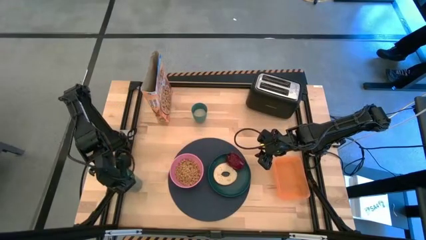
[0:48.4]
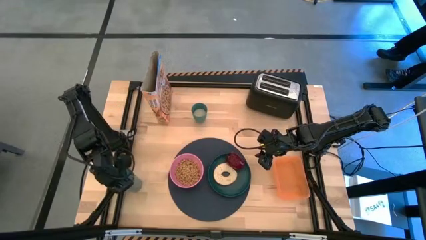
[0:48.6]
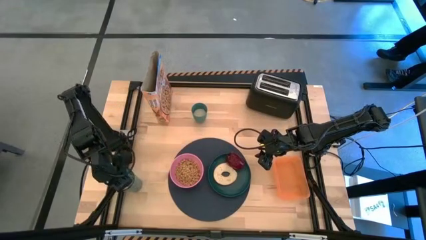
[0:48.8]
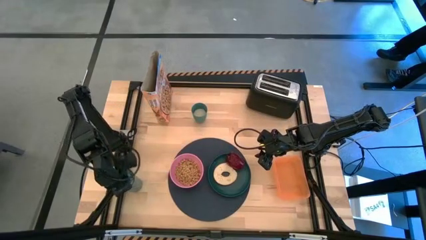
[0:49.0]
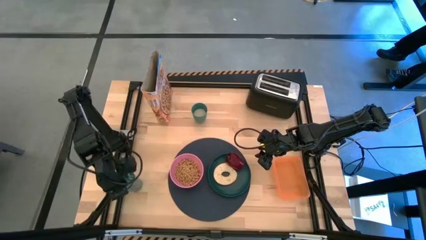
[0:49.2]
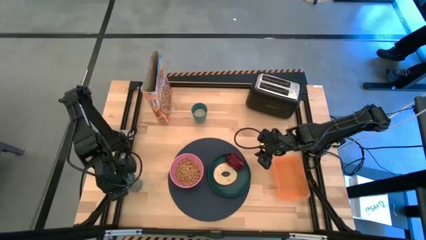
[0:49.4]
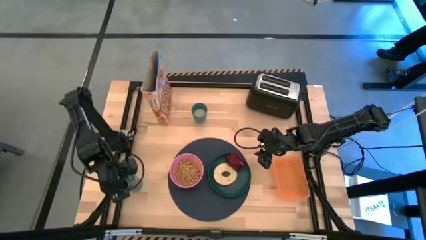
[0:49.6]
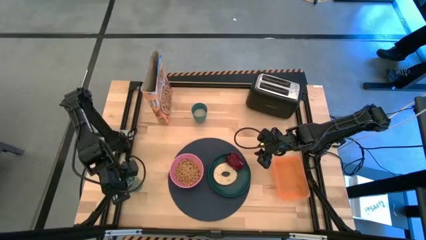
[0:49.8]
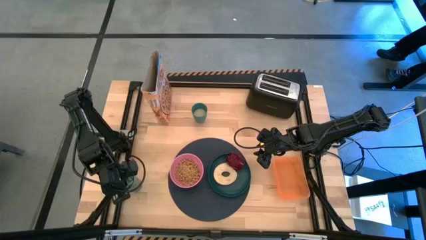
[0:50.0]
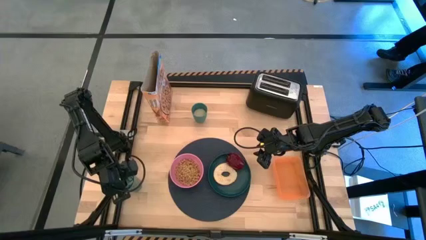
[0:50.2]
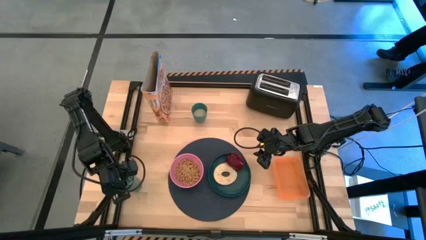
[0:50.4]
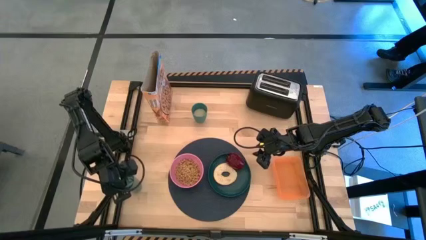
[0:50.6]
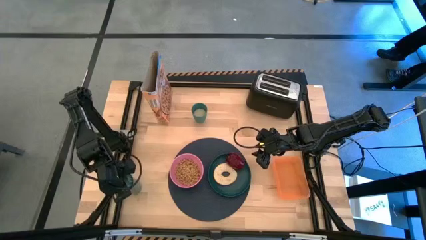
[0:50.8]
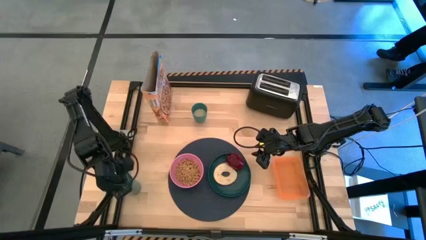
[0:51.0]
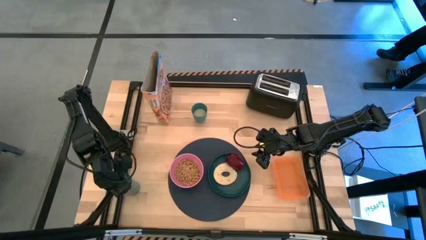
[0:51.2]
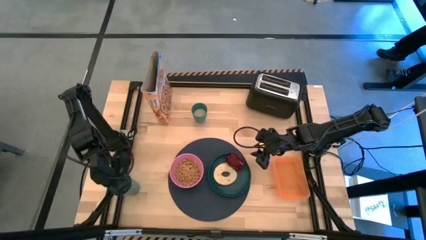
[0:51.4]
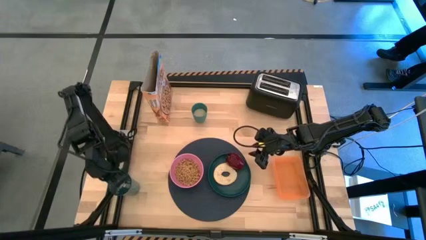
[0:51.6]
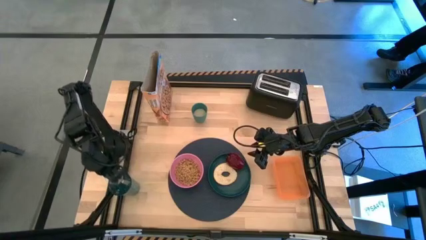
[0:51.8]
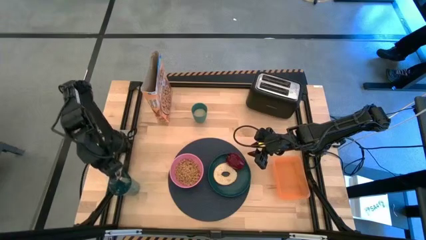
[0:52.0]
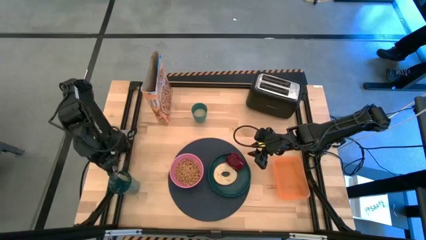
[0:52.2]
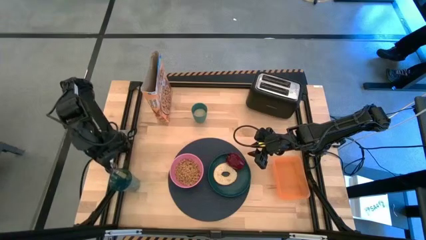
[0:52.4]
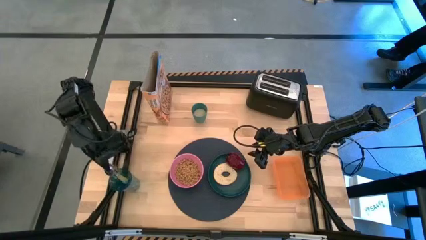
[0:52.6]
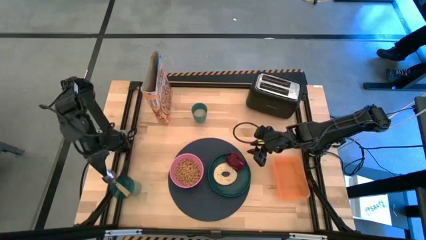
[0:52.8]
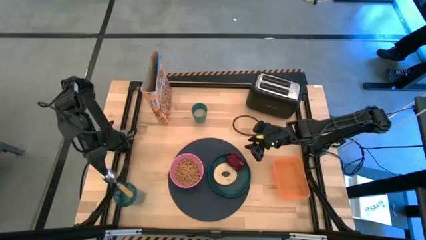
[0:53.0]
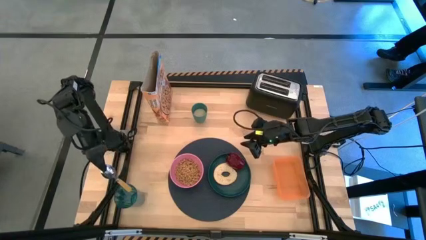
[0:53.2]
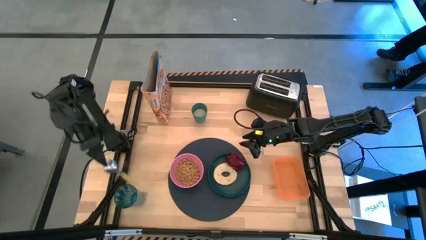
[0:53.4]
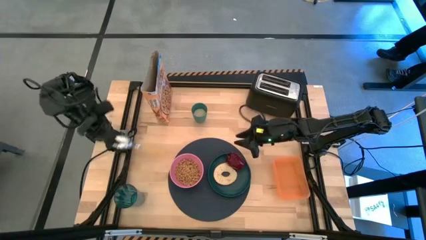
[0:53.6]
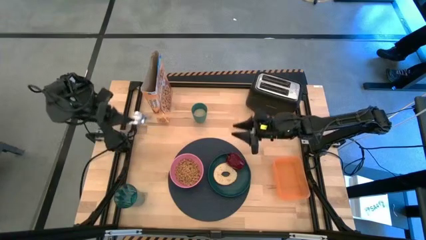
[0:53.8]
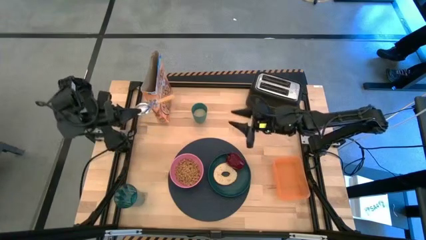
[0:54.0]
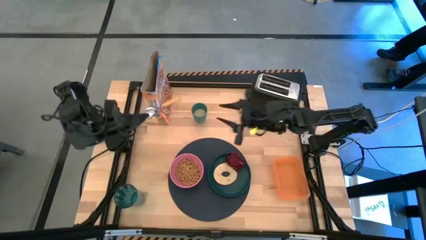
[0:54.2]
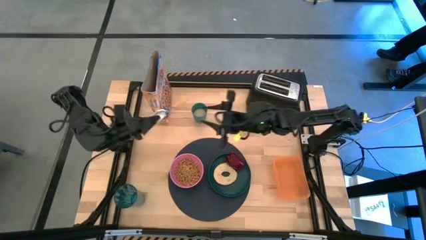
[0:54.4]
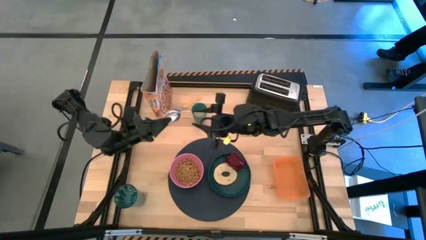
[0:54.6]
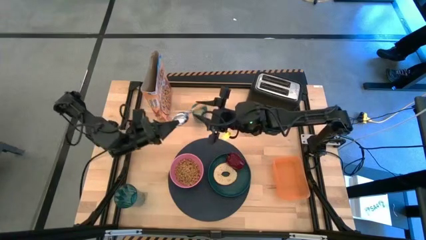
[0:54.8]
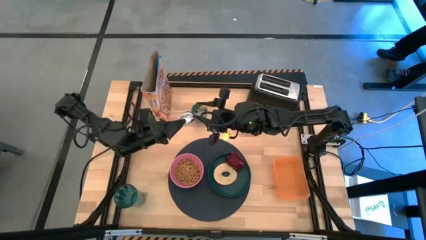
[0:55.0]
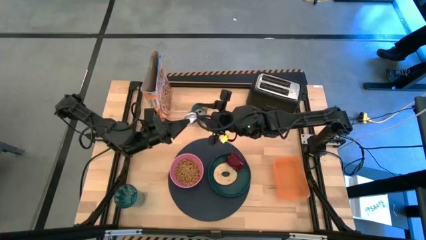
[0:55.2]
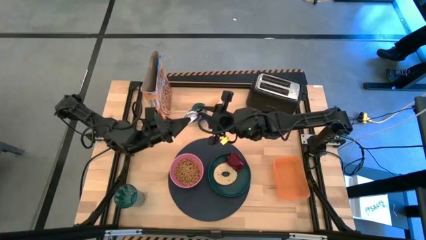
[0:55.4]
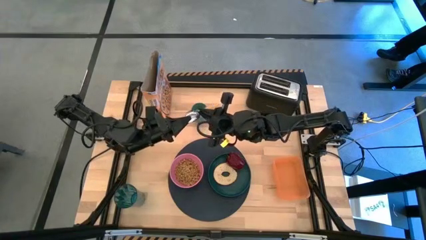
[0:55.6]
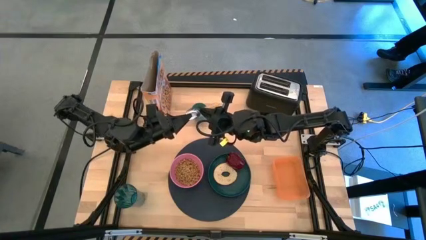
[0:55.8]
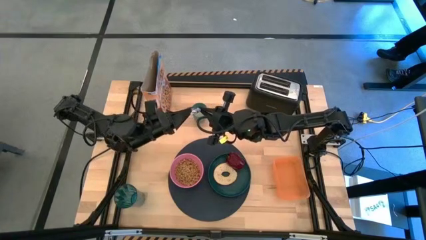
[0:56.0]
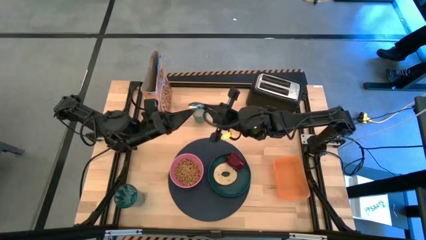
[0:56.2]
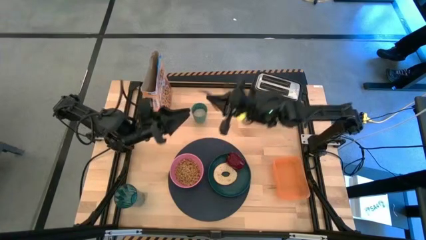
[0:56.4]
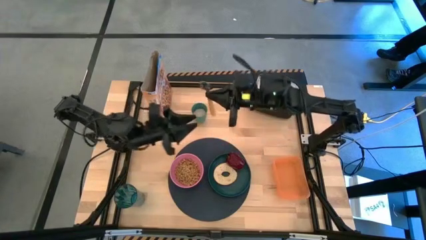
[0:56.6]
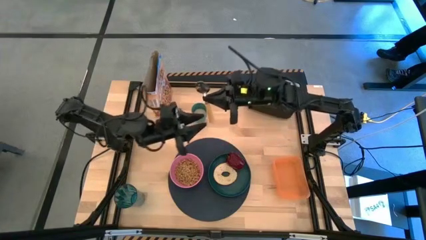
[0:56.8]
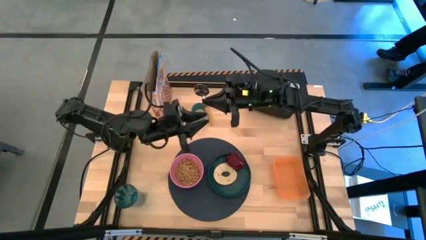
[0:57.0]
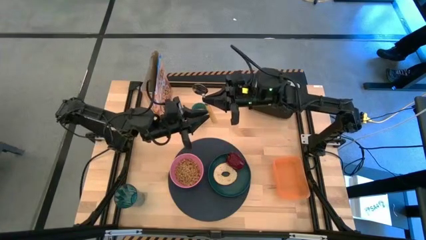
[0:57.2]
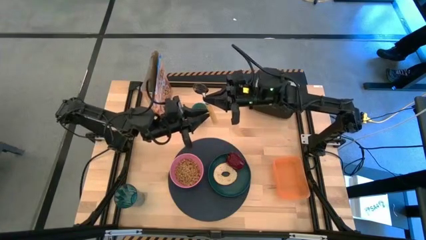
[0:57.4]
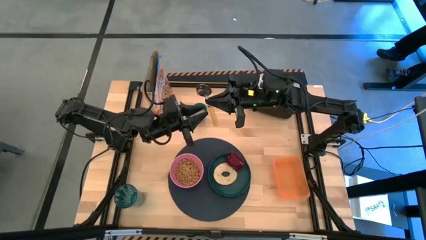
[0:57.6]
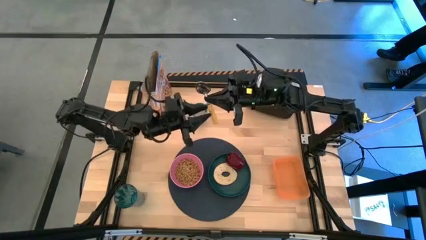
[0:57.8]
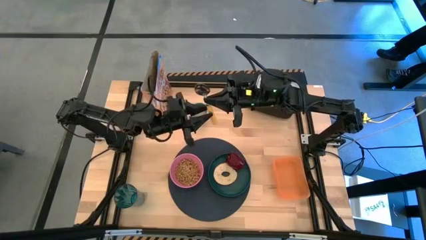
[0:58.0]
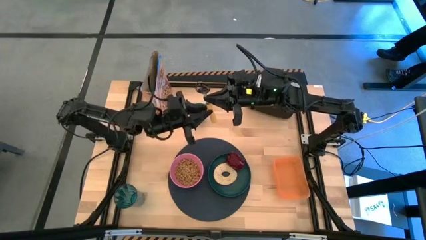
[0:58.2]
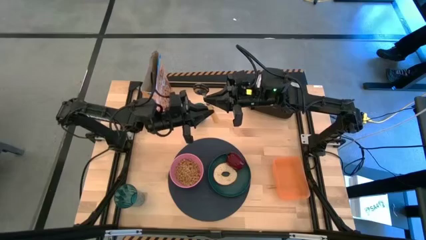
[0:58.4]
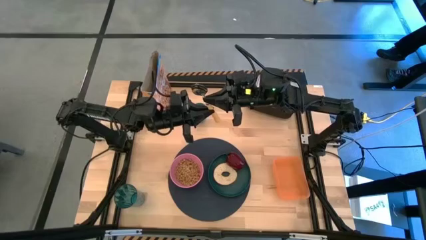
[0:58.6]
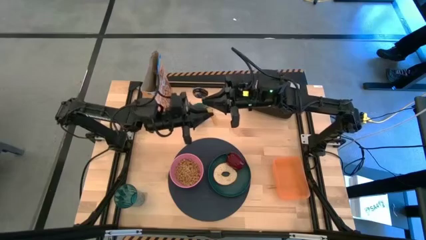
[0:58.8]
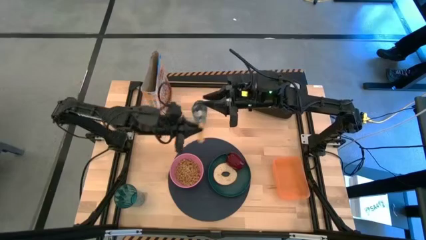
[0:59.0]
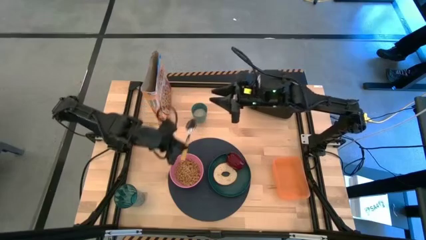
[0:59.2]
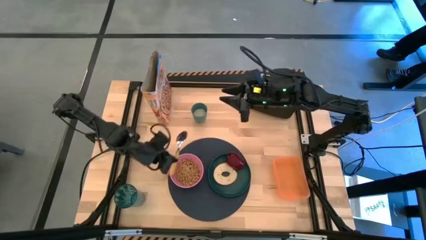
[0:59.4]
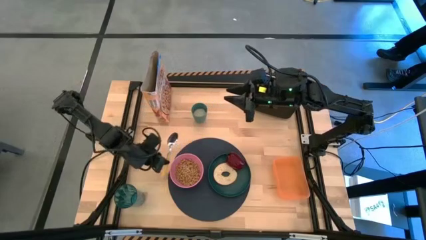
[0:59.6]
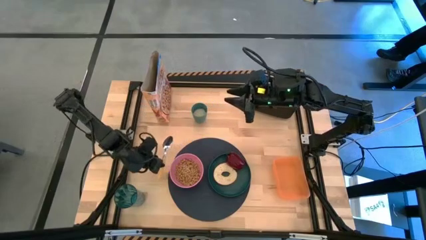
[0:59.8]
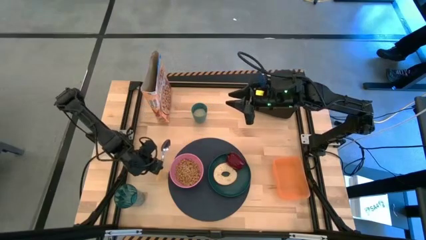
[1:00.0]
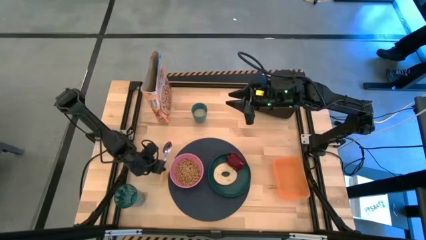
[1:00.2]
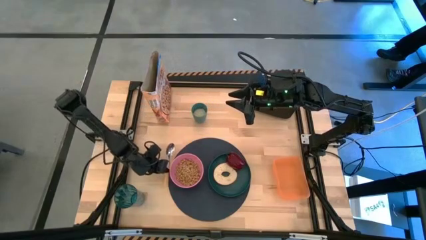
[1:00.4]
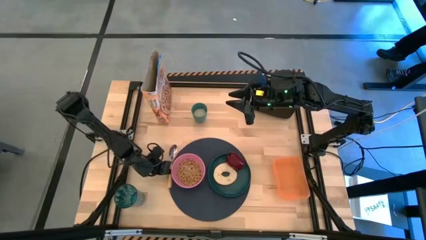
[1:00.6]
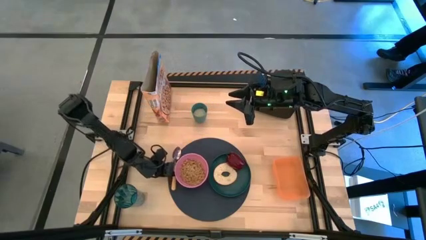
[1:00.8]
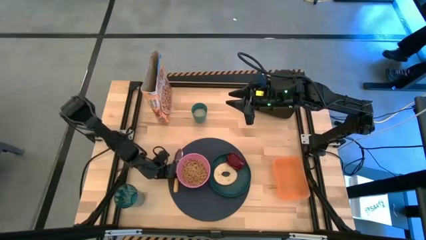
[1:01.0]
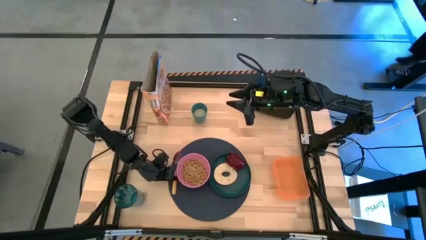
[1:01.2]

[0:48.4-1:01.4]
Task: Arrange a breakfast setting
Put the yellow spoon on the left side of the blue placemat

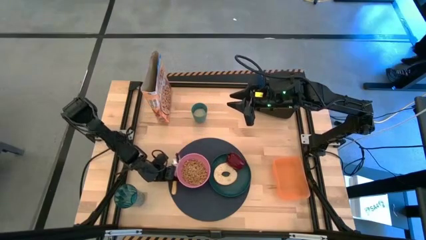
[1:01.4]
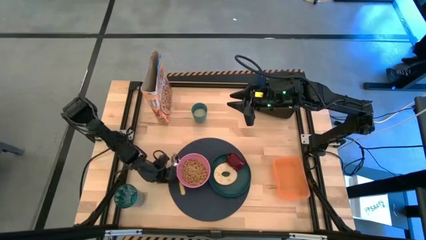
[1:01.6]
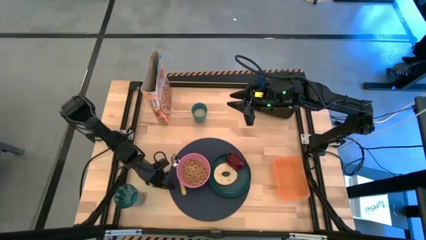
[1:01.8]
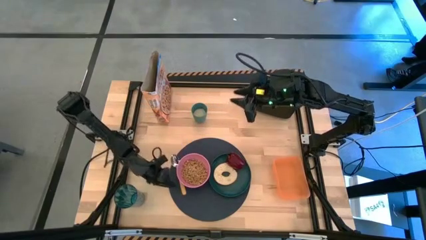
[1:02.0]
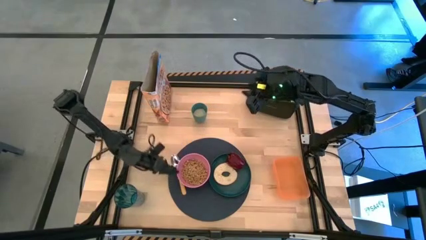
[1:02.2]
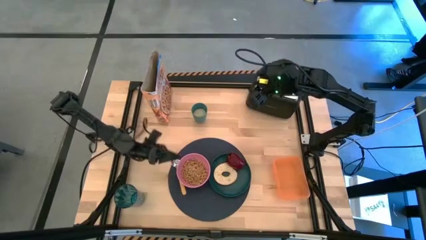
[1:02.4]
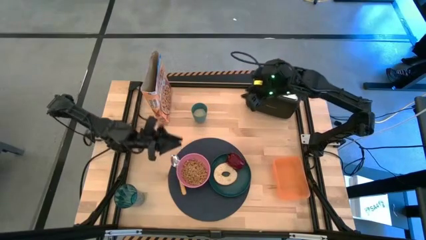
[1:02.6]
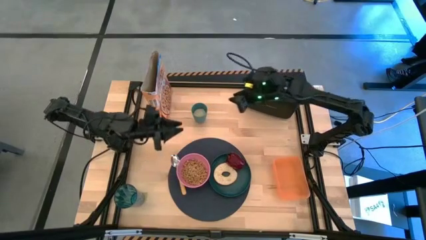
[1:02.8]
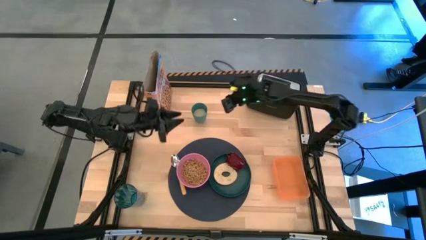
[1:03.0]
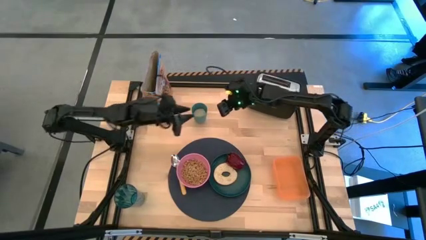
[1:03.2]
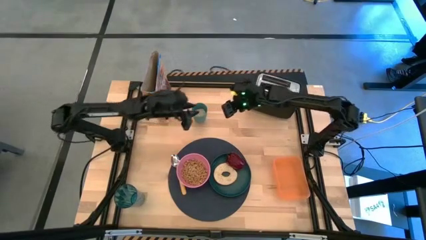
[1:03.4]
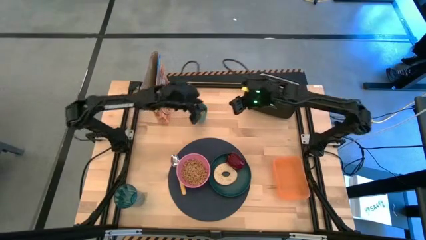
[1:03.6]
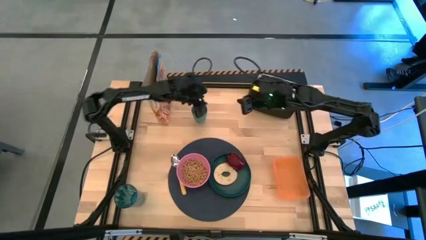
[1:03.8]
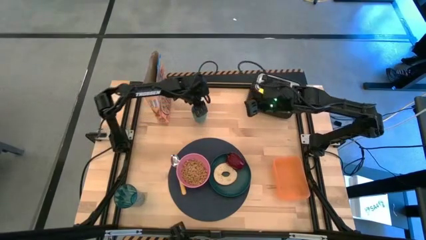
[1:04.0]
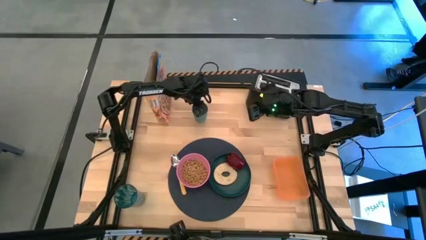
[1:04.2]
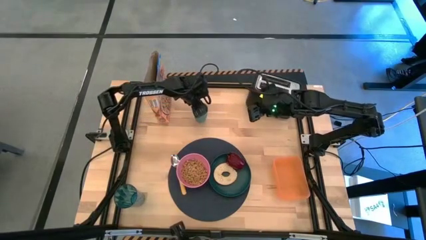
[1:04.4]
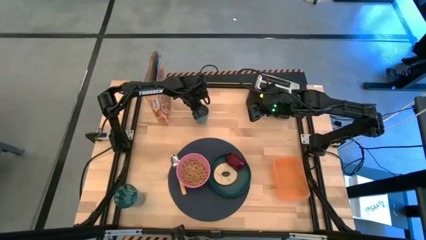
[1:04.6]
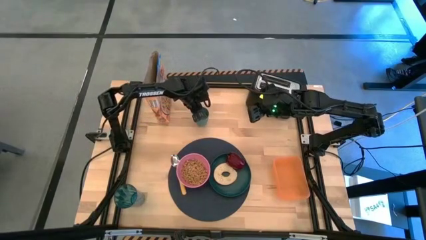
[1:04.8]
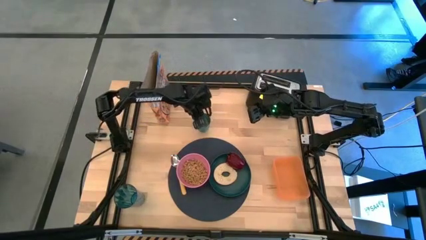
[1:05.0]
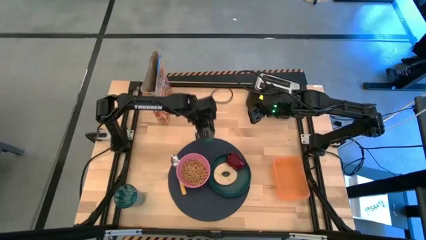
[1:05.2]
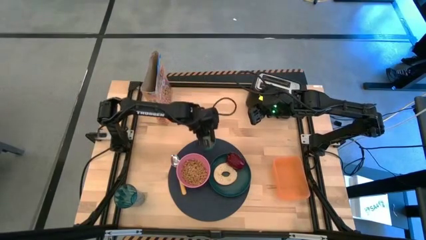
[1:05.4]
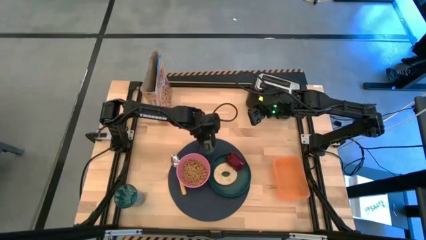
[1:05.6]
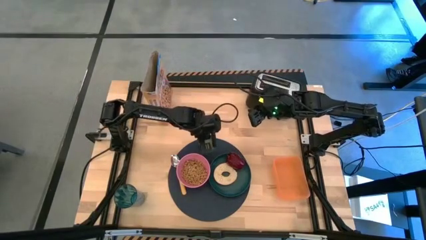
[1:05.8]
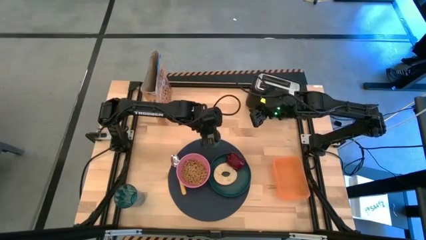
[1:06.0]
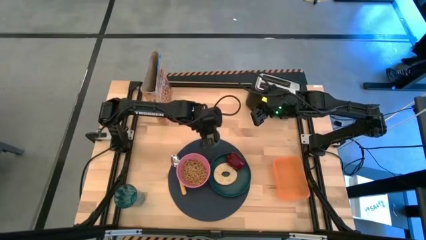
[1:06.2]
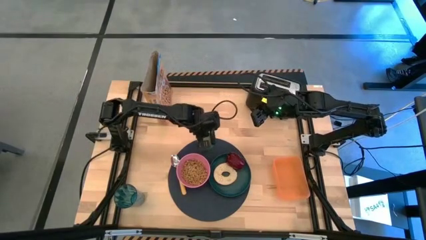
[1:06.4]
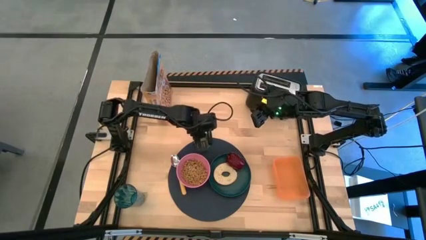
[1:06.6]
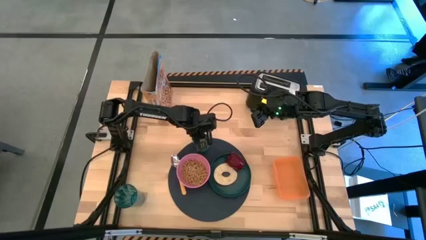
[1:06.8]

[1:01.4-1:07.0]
Put the blue cup on the blue placemat above the pink bowl
